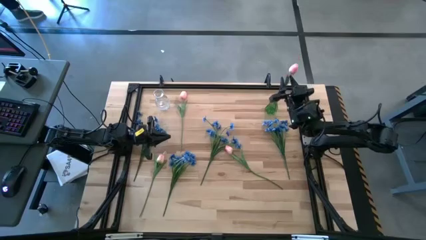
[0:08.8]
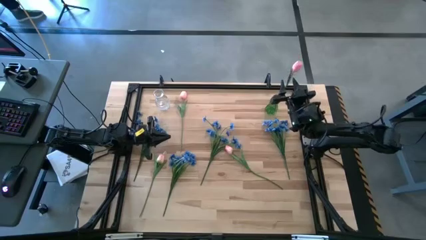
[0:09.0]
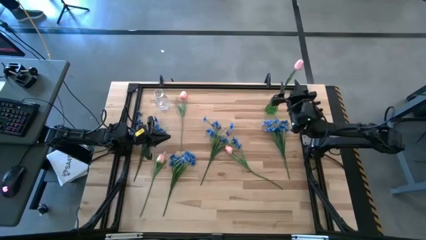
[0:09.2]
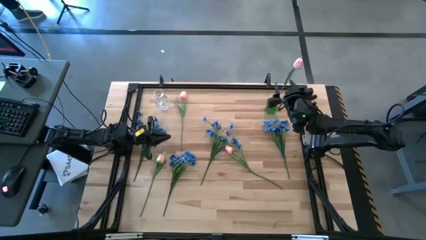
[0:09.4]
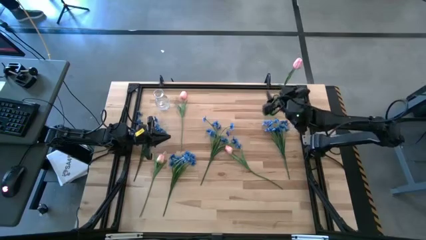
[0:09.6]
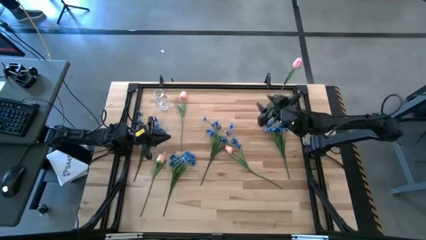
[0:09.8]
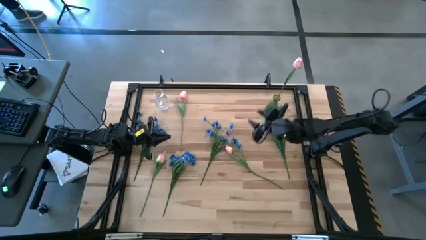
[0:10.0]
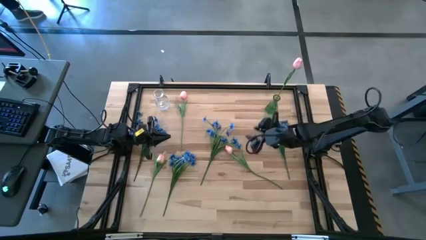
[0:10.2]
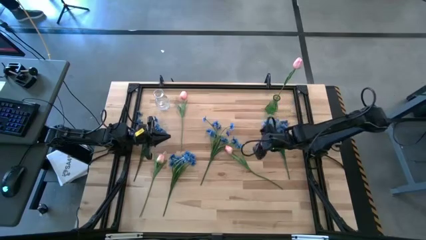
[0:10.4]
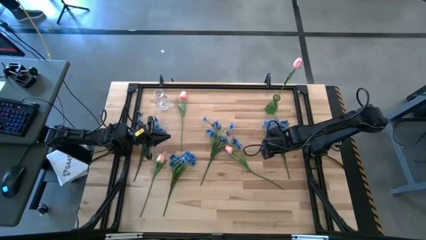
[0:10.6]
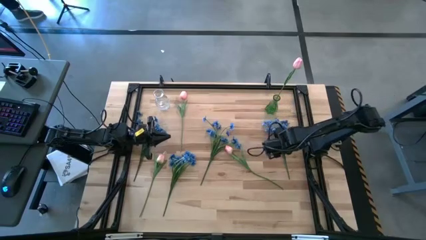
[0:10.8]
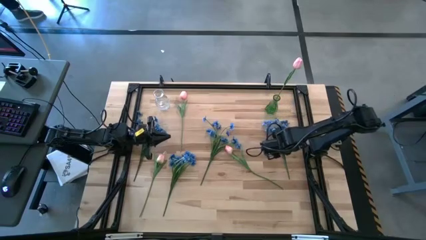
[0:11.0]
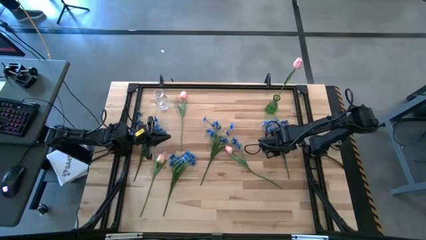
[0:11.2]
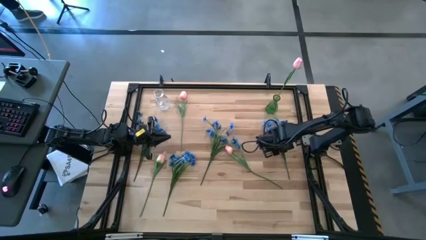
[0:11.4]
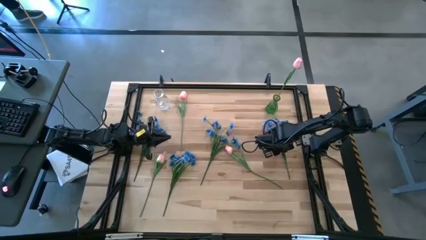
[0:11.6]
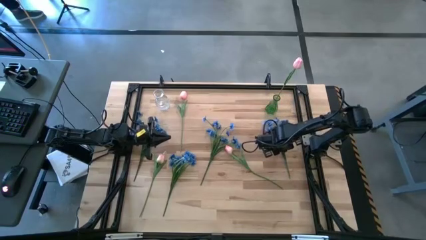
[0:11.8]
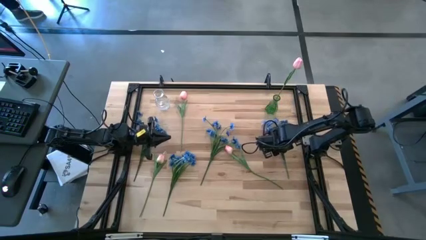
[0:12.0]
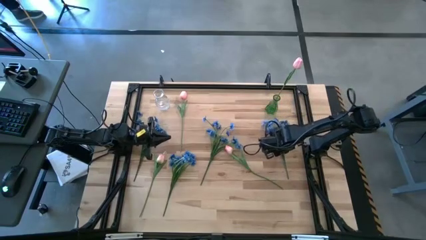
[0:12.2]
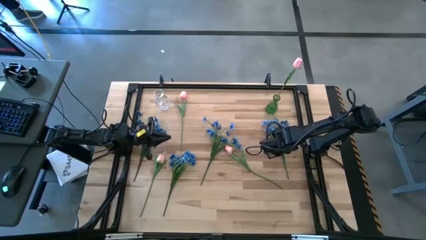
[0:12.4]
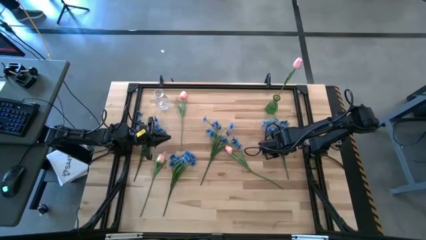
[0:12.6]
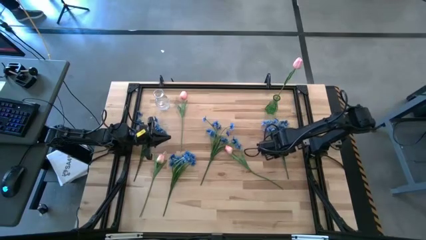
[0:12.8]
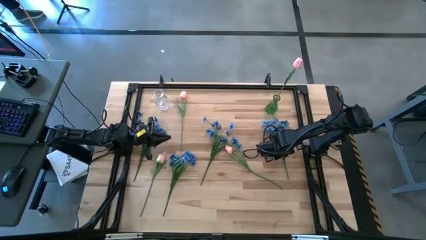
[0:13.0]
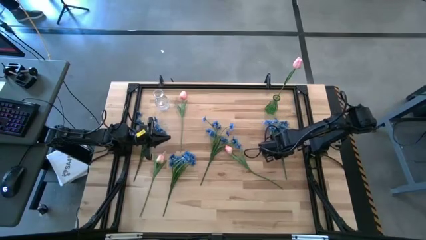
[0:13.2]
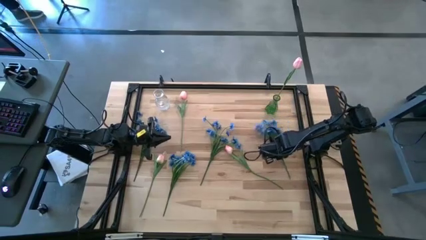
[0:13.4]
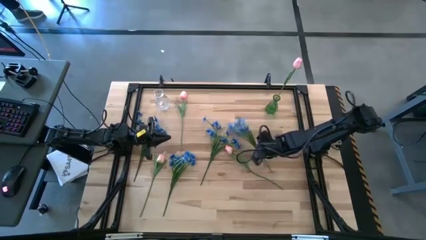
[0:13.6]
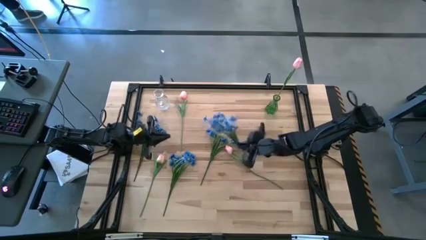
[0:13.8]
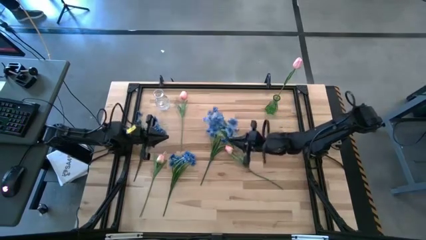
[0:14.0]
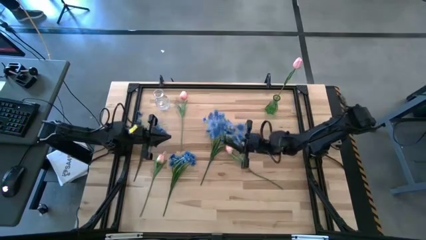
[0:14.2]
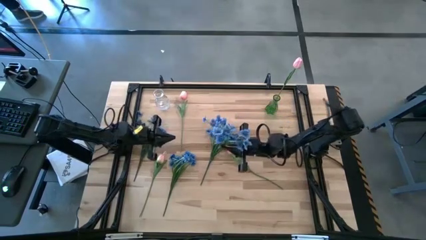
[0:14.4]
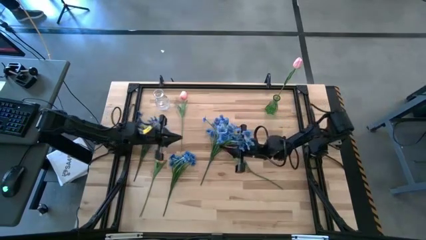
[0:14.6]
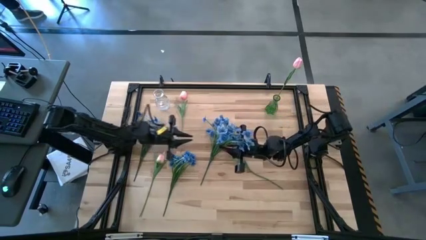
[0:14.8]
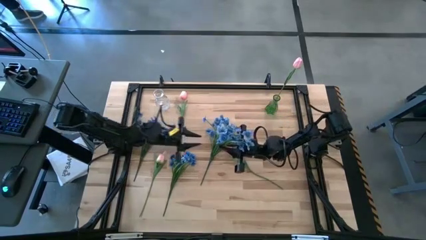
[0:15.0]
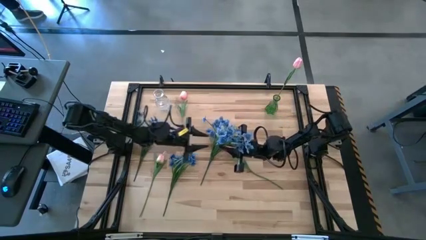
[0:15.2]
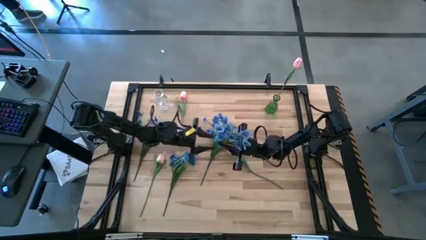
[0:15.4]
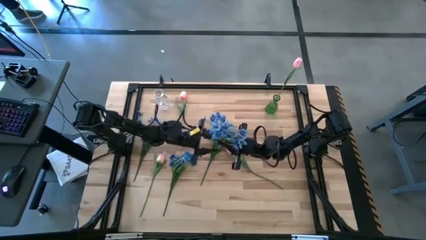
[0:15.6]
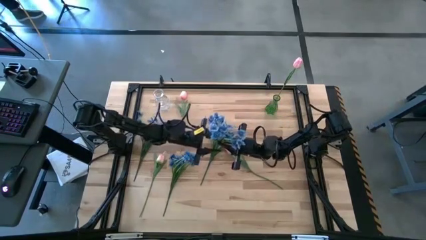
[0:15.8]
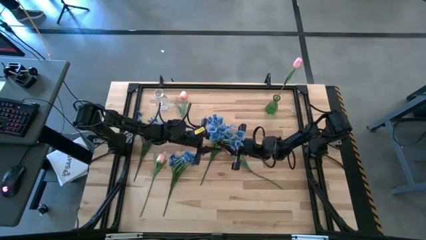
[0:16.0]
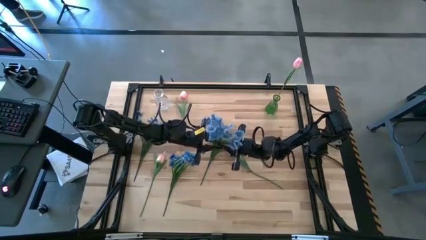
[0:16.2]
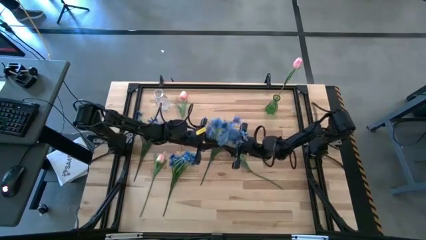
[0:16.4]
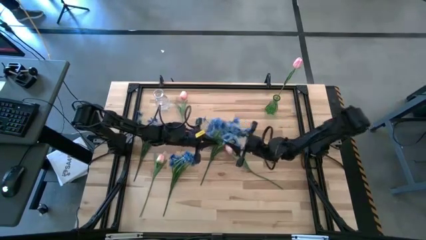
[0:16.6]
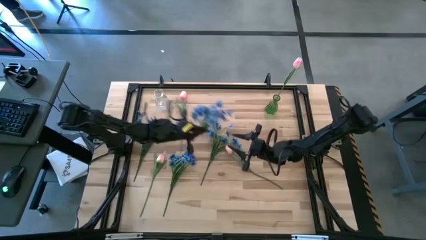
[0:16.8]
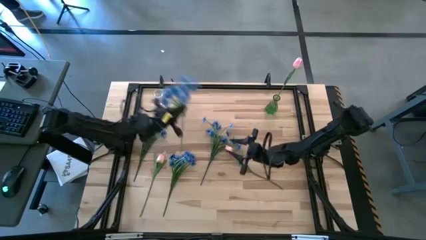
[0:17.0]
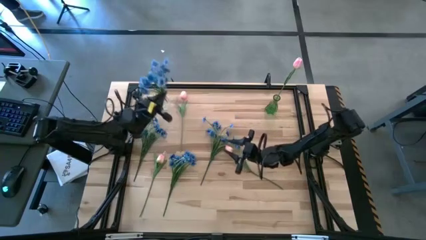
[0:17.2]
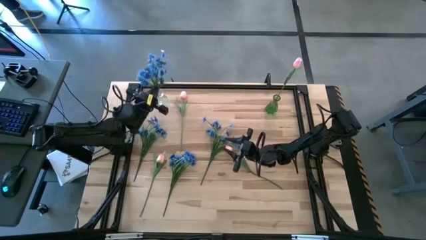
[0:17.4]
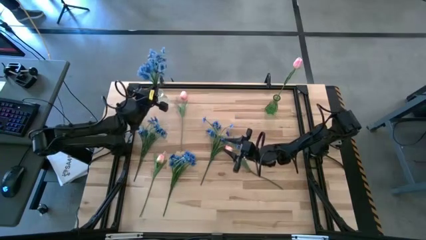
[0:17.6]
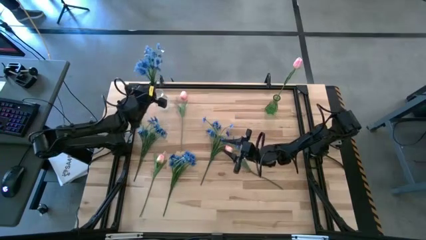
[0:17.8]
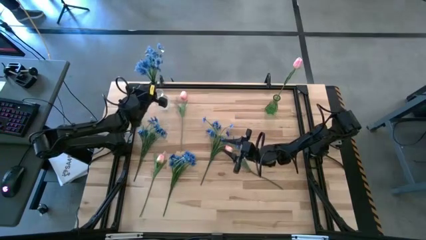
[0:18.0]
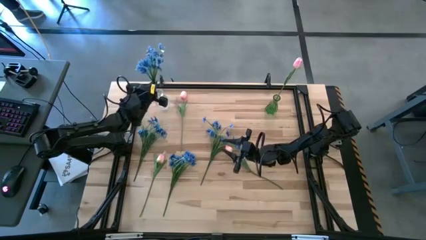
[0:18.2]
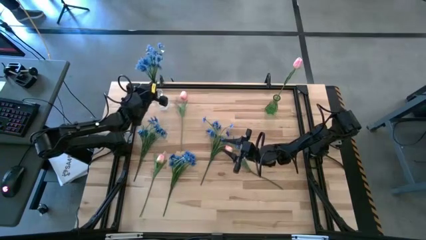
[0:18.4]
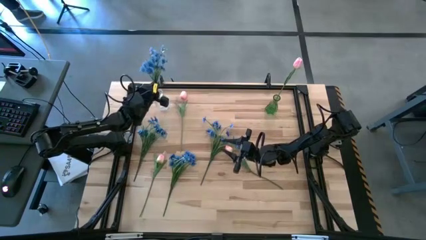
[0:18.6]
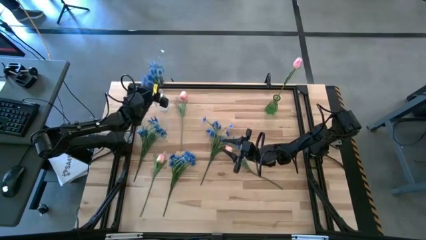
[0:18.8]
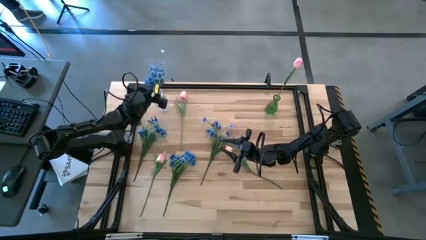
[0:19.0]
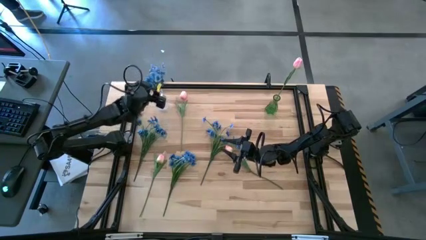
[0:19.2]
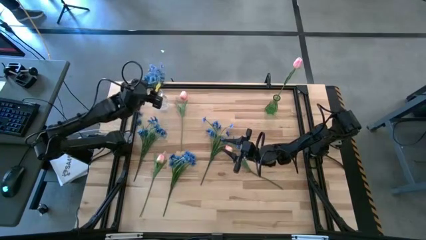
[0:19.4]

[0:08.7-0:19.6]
Task: Sort flowers into vase by color
Put the top right blue flowers into the transparent vase

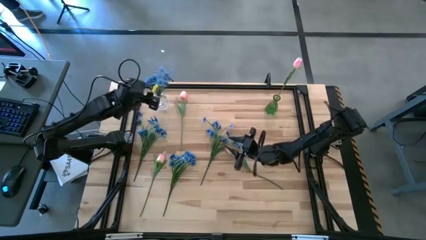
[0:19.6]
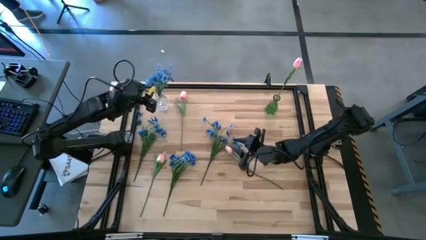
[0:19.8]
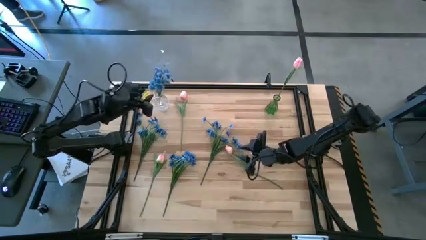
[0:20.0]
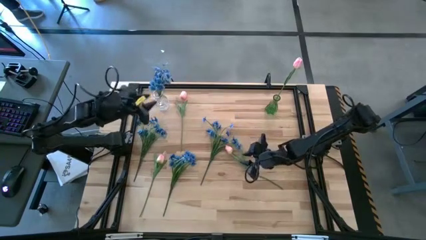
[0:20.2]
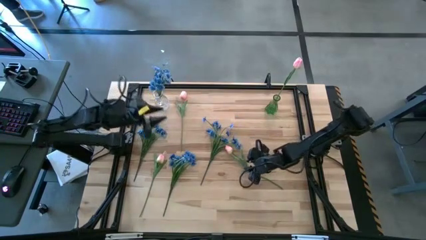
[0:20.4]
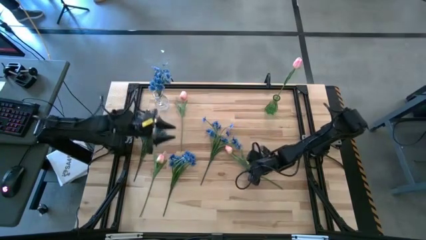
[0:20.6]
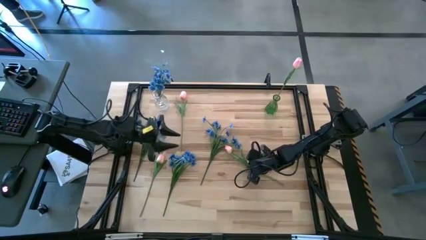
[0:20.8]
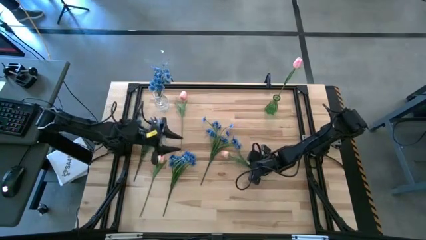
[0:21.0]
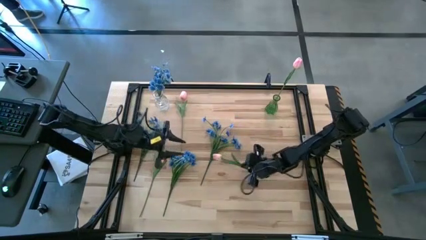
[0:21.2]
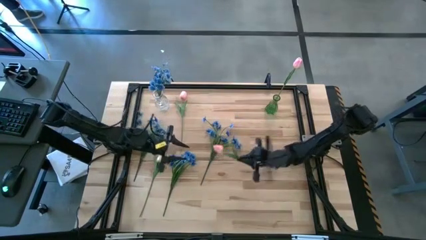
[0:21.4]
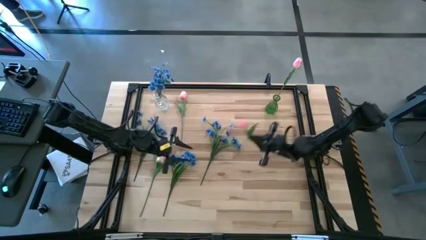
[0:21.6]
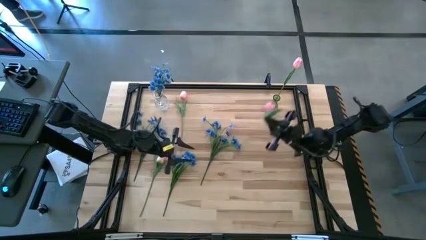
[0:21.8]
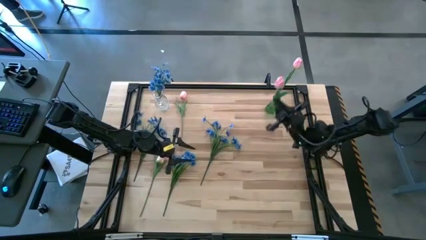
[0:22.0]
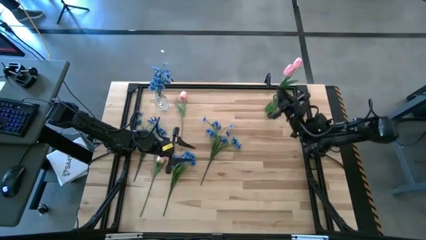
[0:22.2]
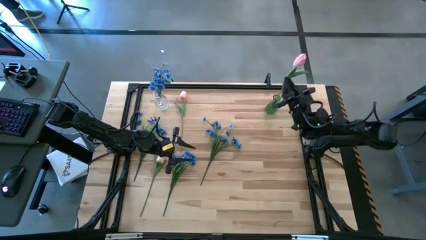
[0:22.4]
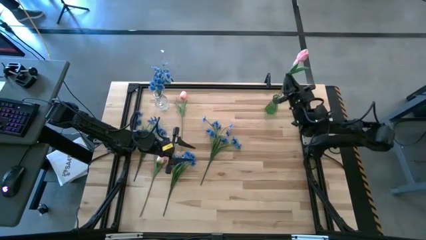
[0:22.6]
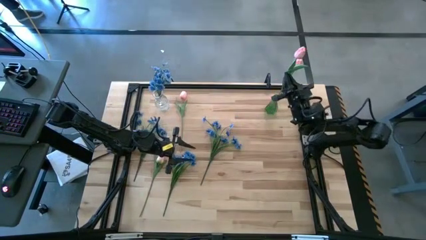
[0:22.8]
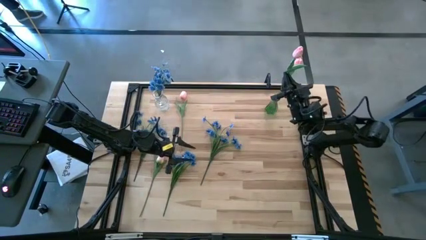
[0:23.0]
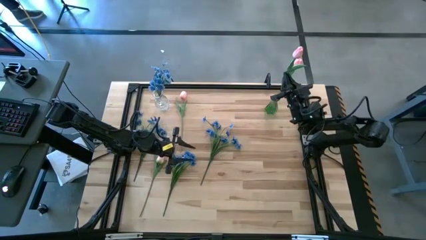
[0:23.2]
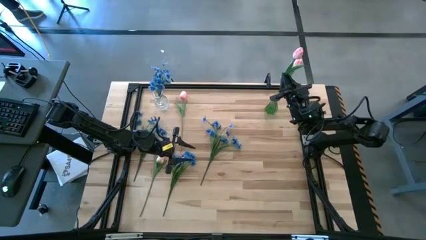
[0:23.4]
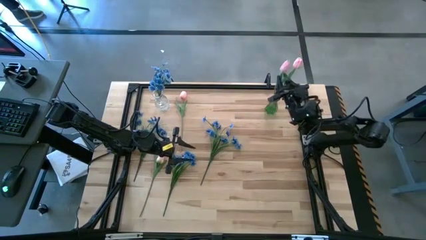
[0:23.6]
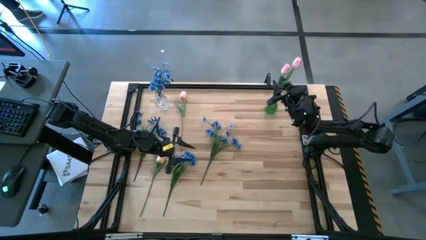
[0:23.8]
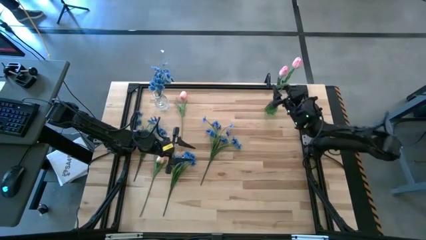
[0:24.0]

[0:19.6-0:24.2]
Put the bottom right pink tulip into the green vase

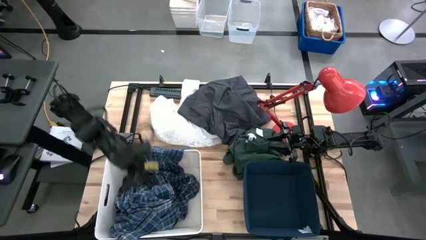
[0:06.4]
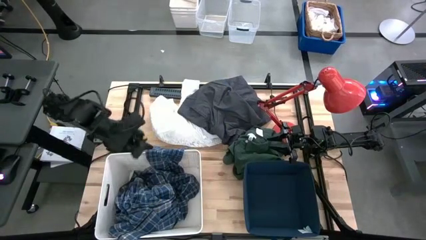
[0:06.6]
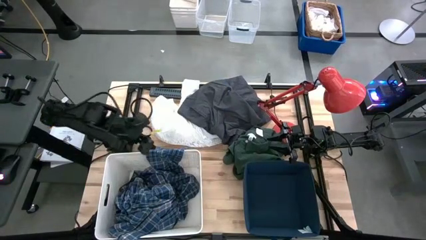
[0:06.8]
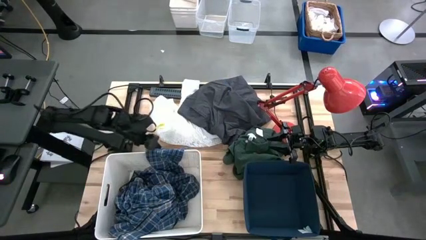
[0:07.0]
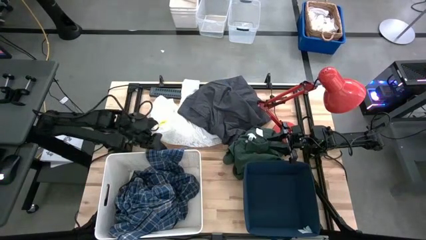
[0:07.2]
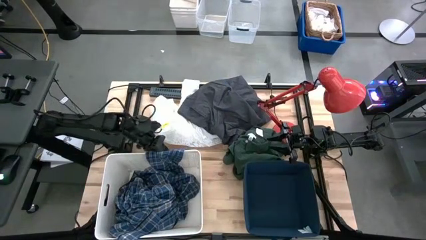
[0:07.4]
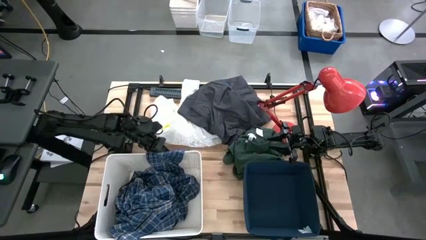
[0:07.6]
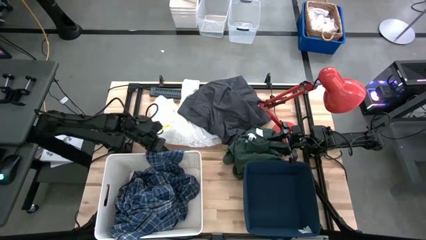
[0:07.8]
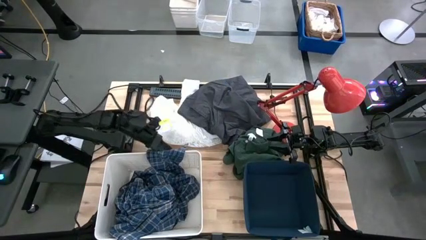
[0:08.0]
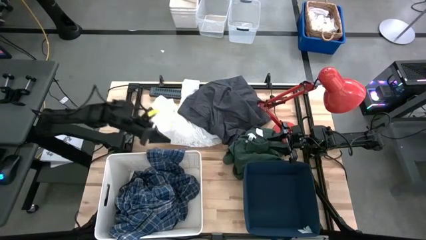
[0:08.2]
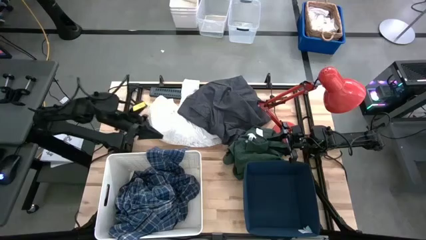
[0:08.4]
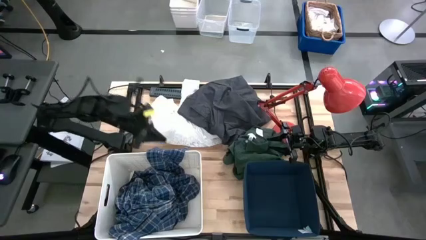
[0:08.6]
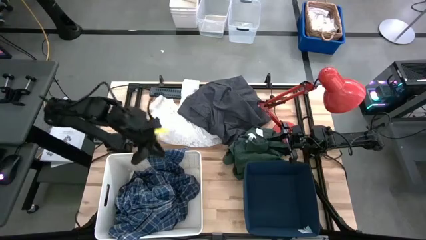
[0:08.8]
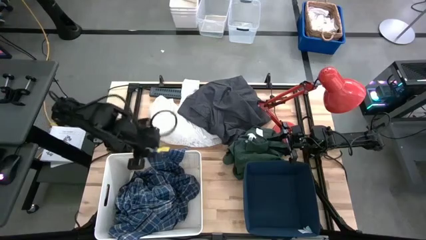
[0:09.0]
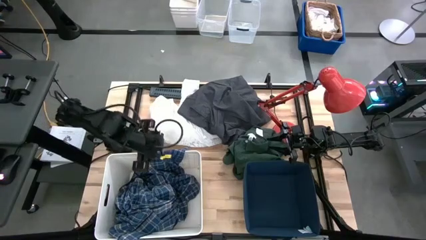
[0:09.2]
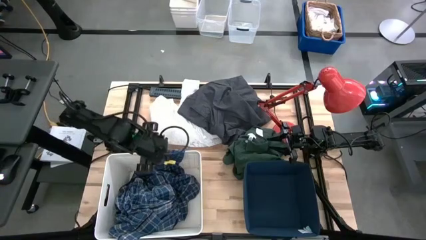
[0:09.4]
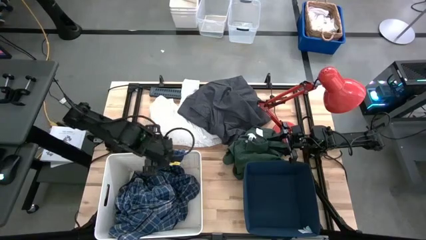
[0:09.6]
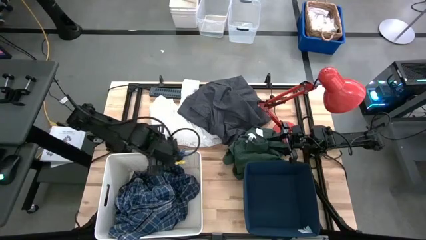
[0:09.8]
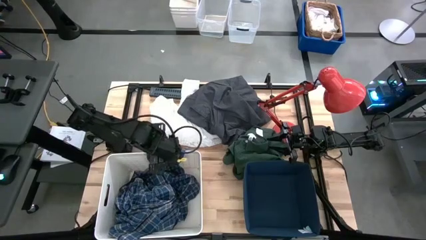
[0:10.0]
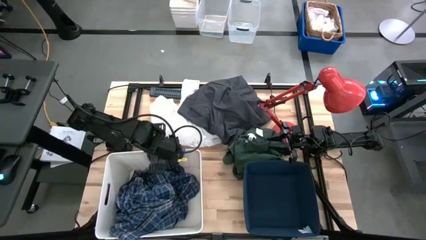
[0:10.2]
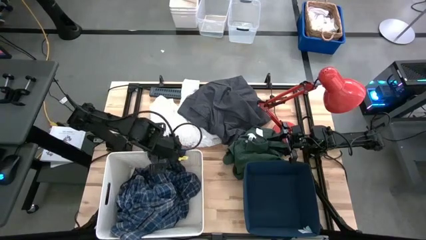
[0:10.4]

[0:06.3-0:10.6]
Task: Sort clothes
Put the blue checkered pajamas into the white bin
